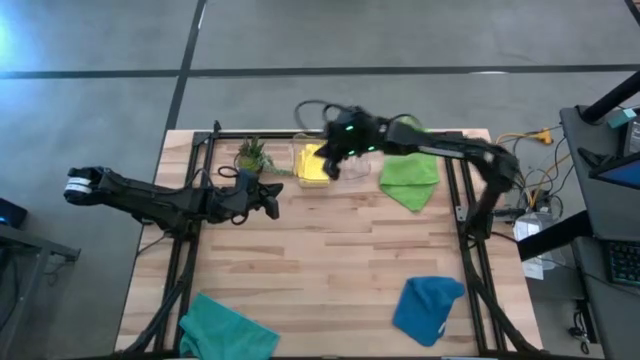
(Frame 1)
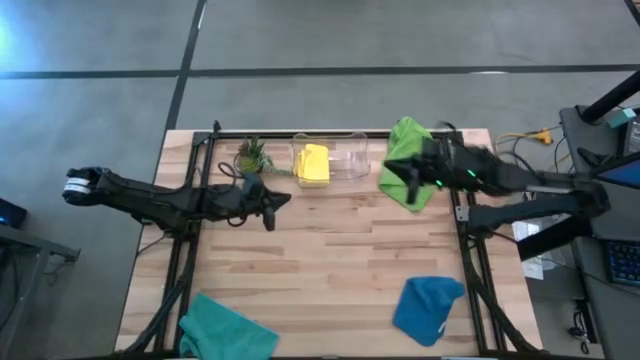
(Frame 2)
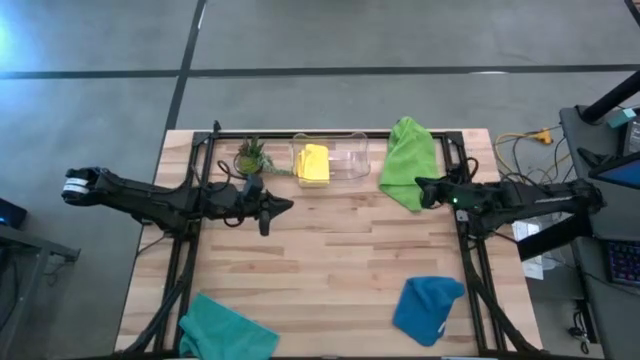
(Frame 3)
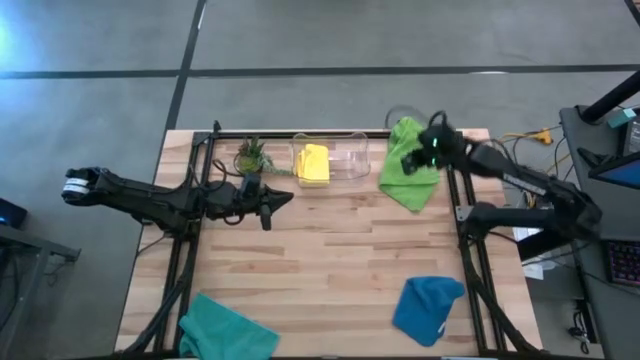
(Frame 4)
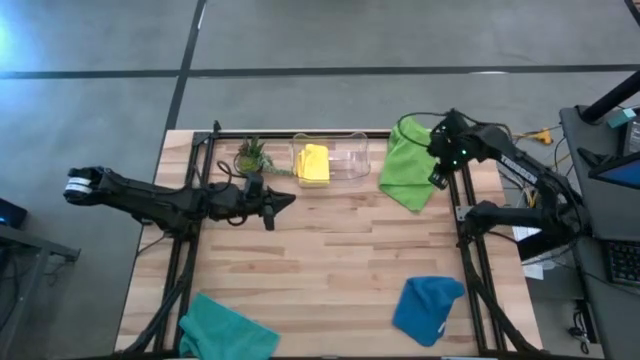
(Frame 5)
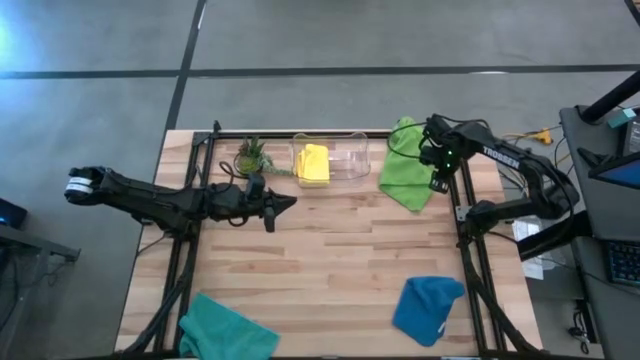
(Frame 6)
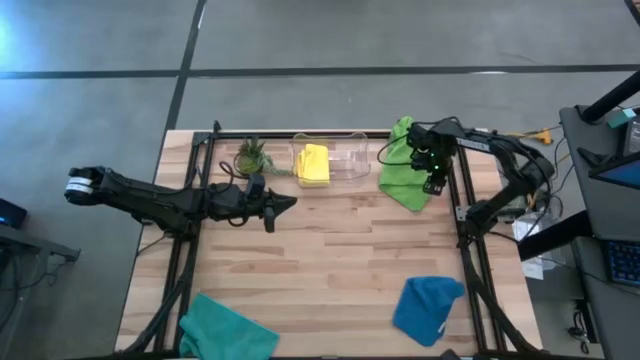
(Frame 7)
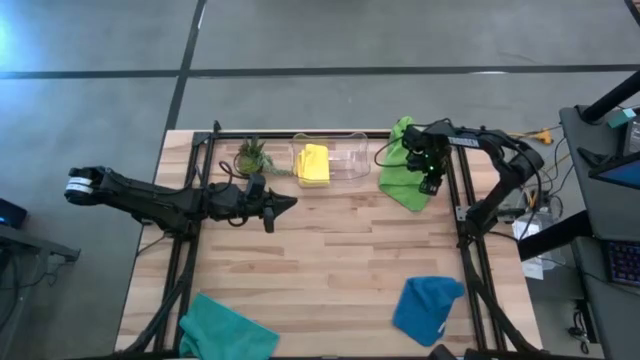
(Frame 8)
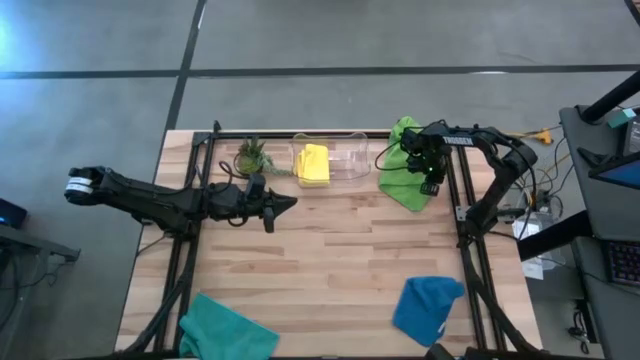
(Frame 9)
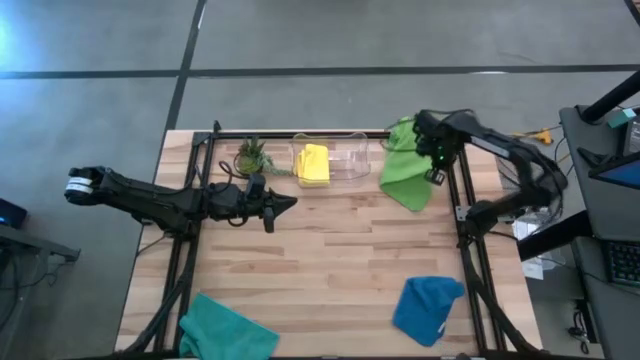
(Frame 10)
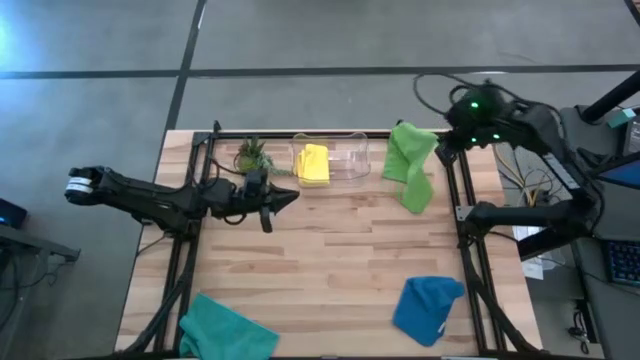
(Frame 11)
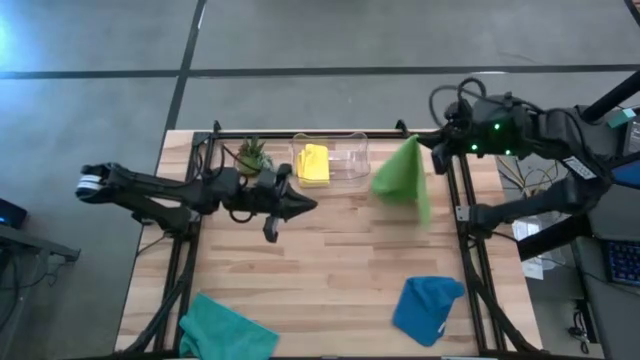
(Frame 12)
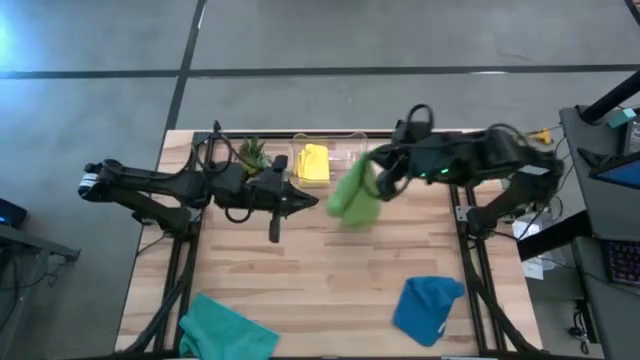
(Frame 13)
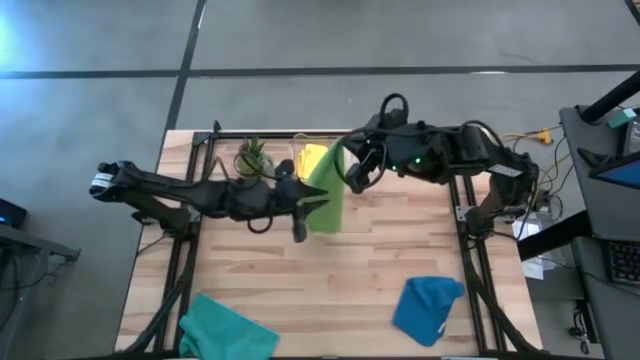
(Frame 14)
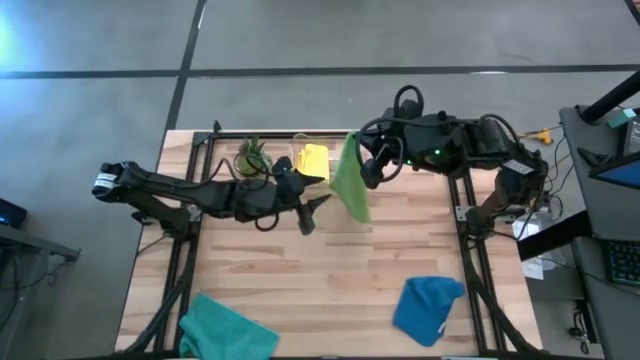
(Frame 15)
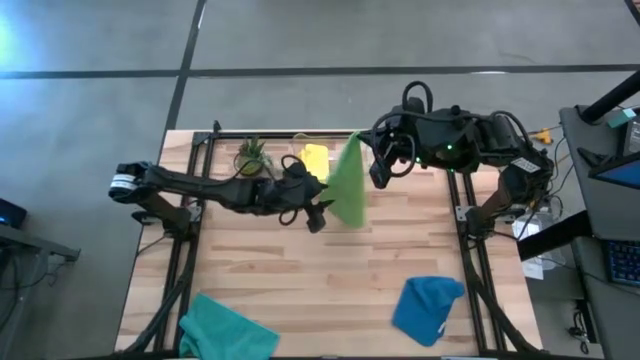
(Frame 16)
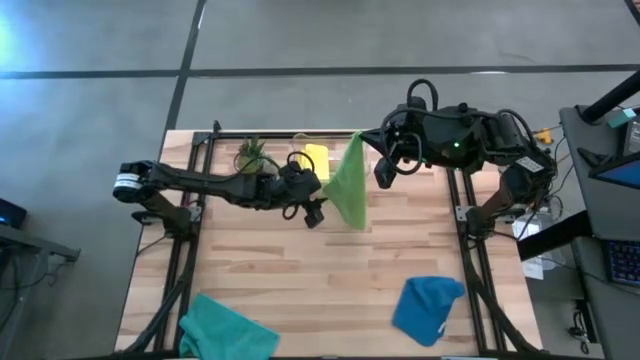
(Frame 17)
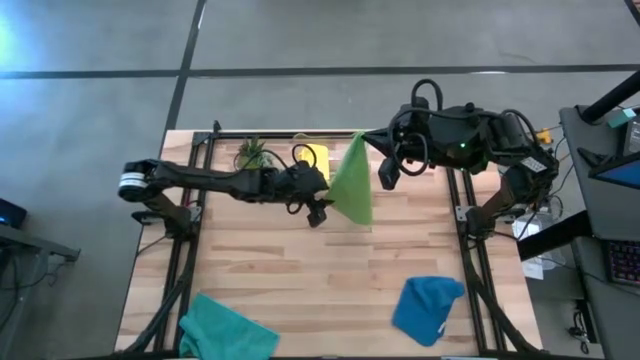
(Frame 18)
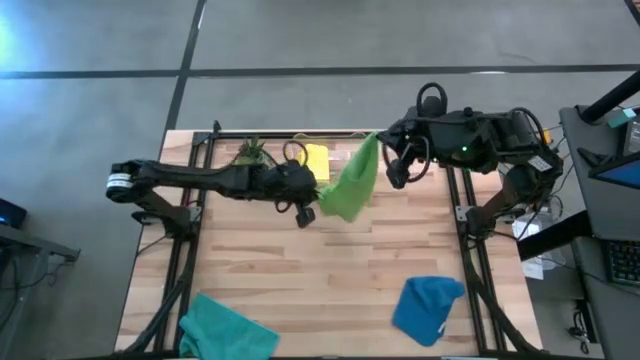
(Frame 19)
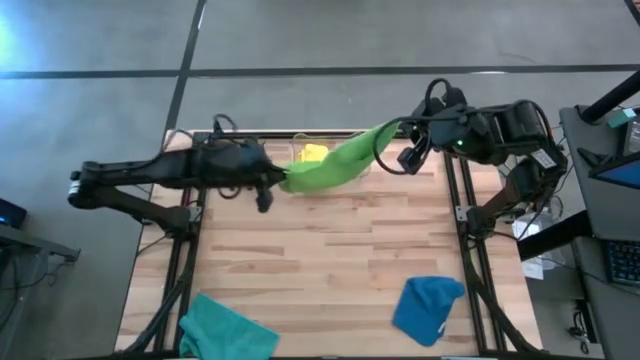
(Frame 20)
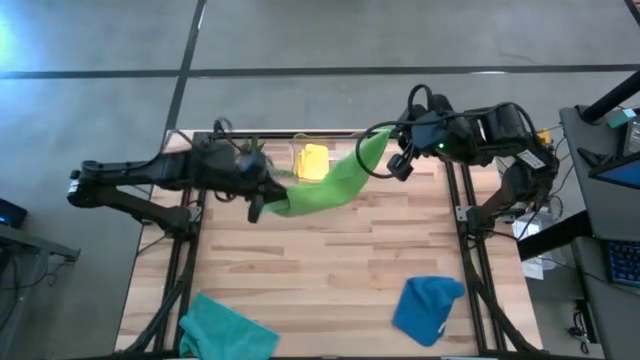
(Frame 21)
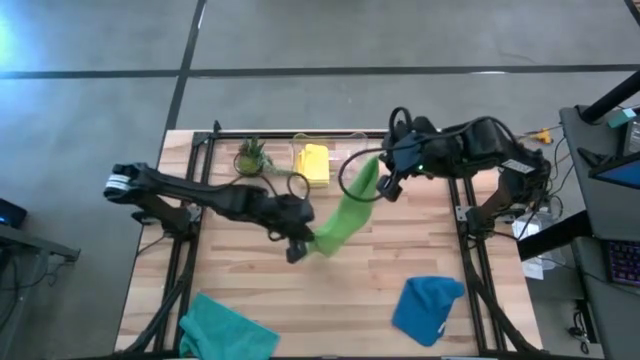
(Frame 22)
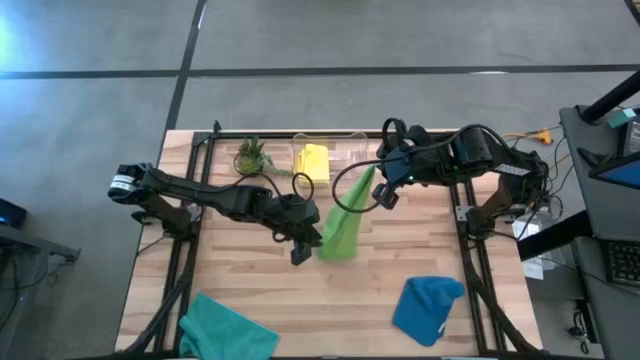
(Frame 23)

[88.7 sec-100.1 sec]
Task: Fold microfiber towels
Fold the green microfiber towel

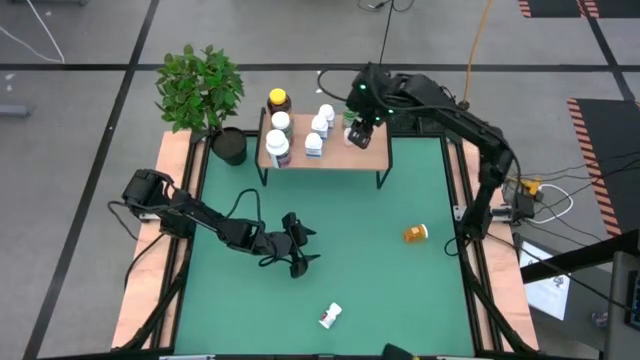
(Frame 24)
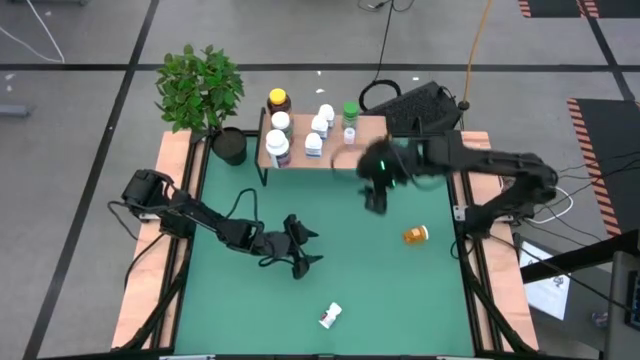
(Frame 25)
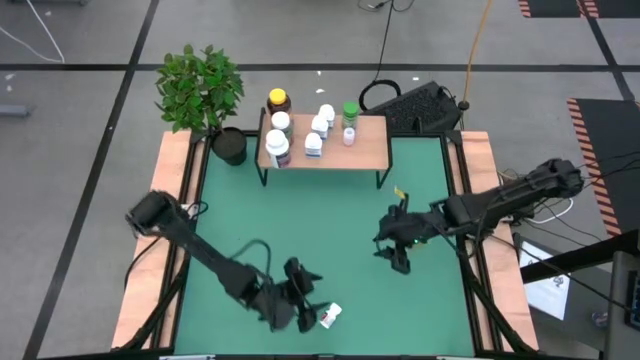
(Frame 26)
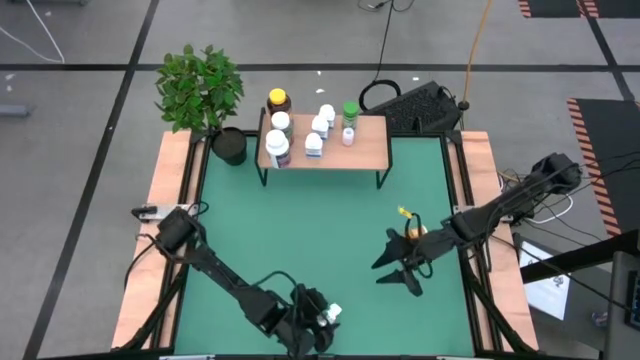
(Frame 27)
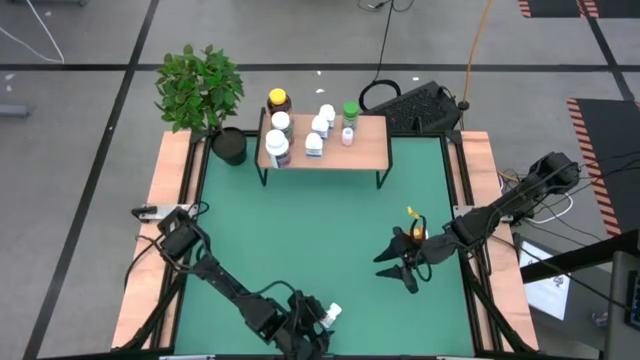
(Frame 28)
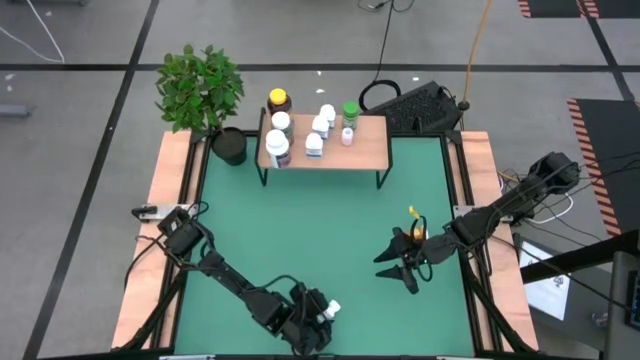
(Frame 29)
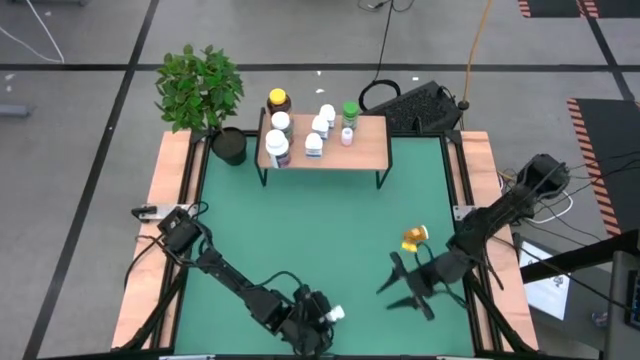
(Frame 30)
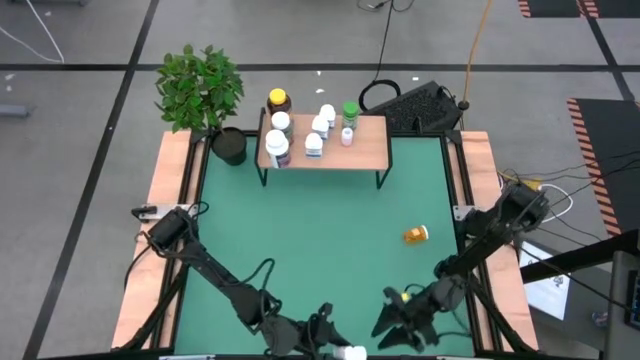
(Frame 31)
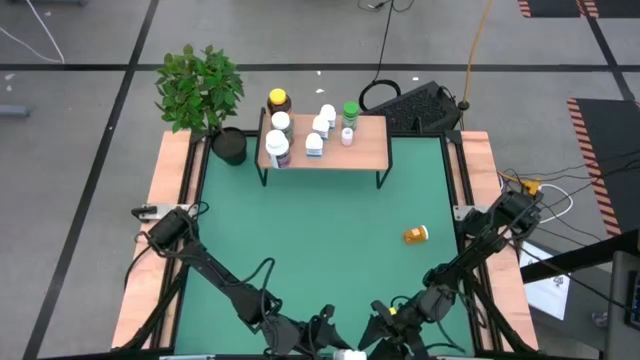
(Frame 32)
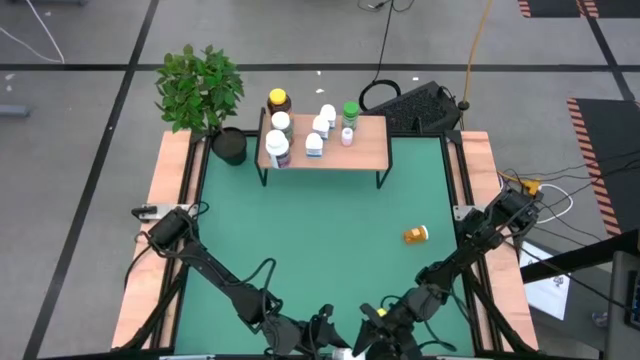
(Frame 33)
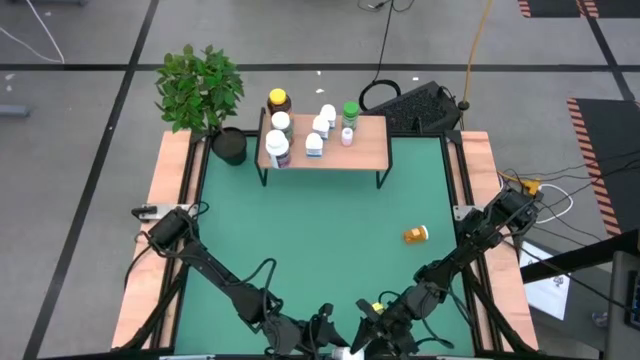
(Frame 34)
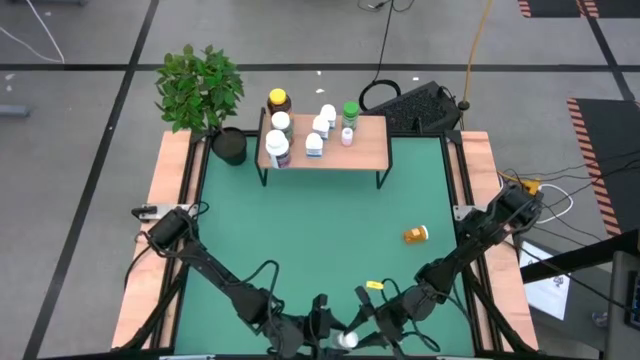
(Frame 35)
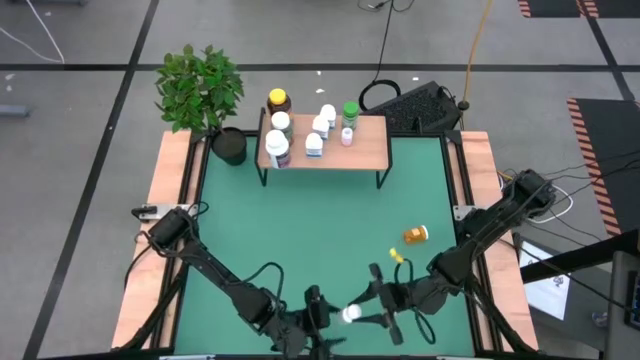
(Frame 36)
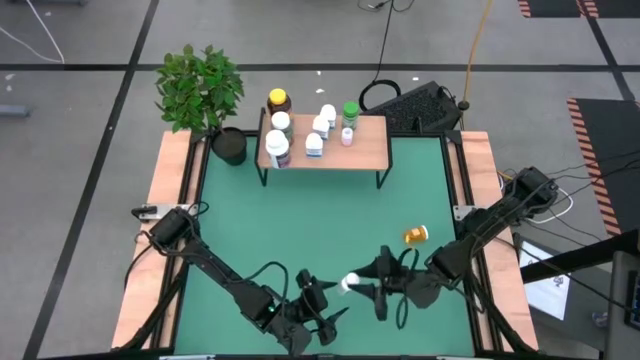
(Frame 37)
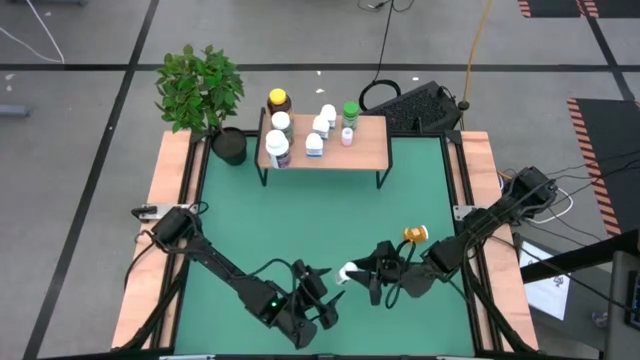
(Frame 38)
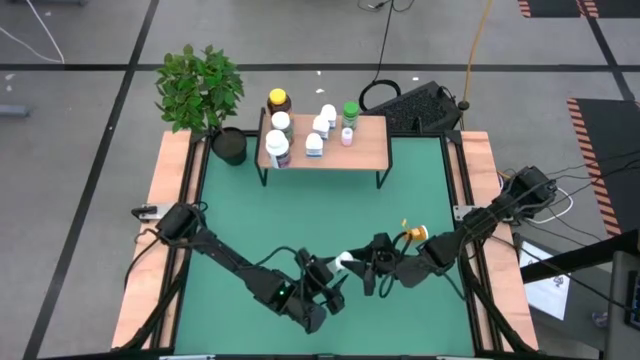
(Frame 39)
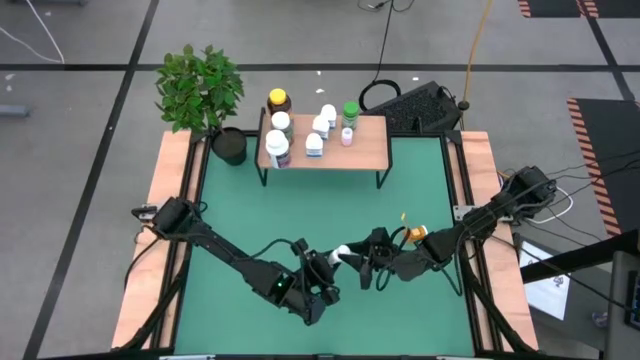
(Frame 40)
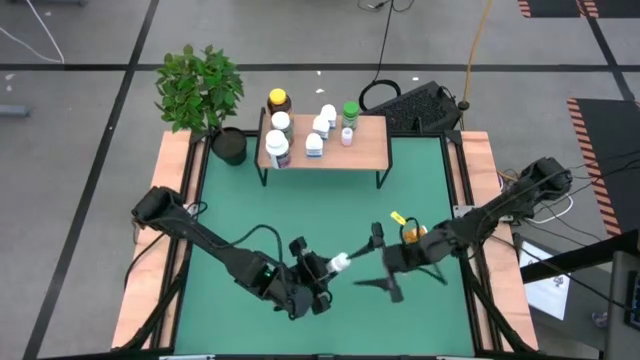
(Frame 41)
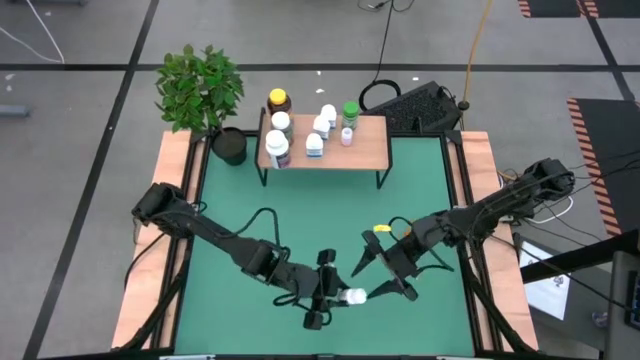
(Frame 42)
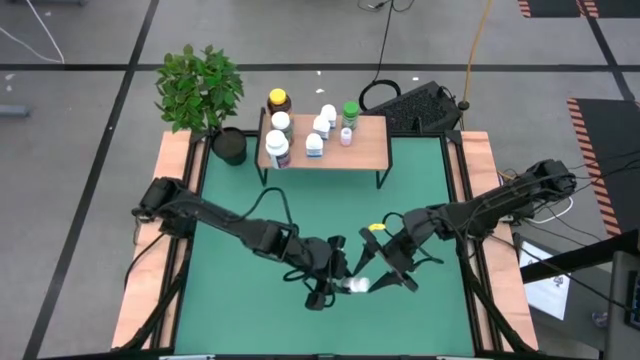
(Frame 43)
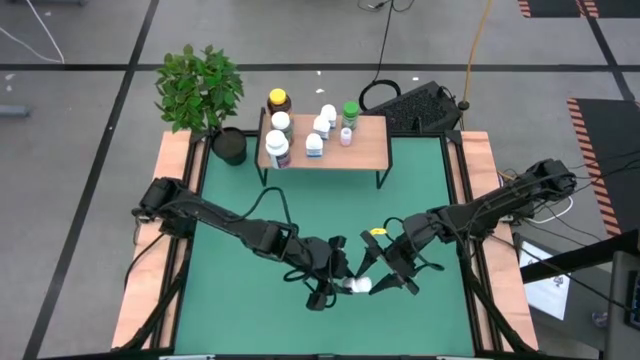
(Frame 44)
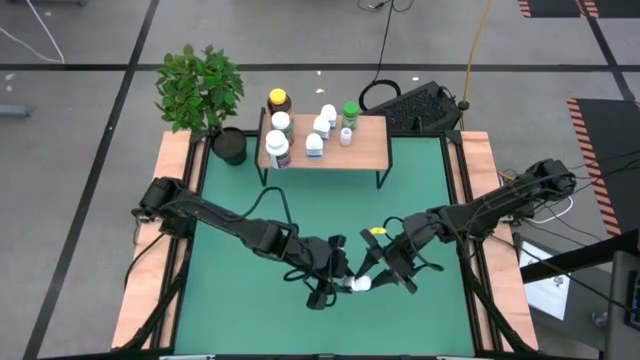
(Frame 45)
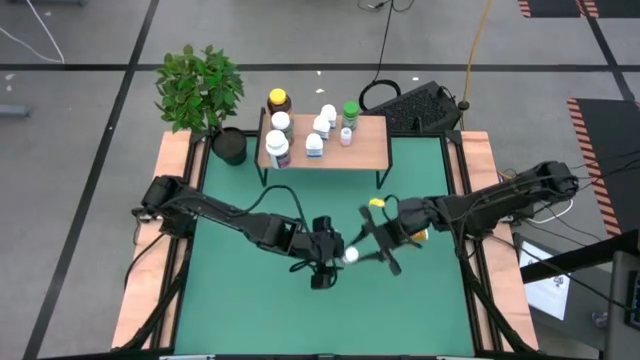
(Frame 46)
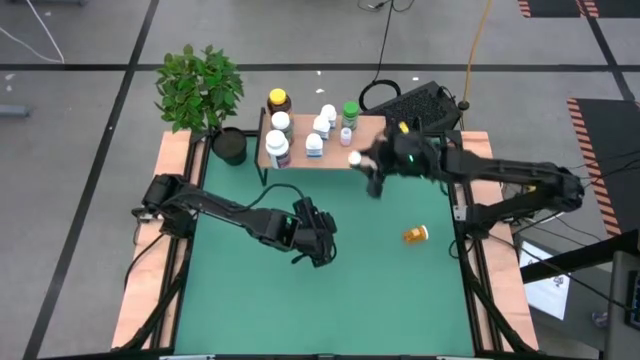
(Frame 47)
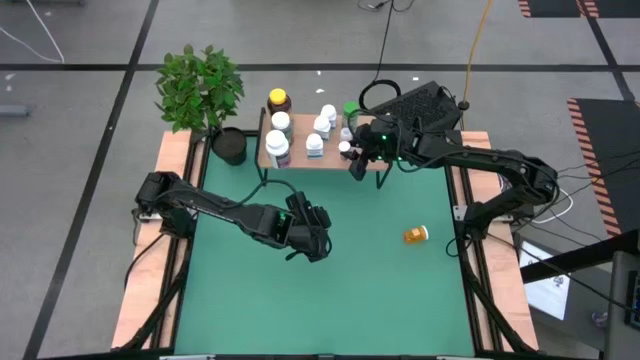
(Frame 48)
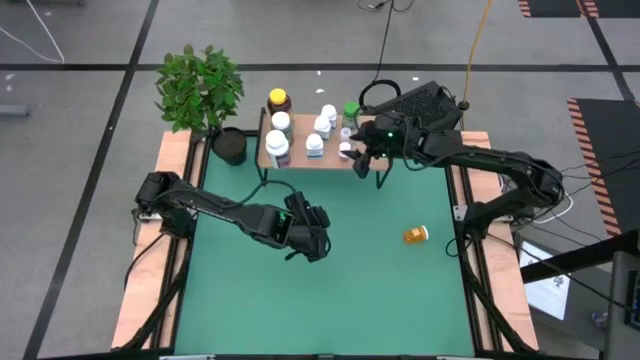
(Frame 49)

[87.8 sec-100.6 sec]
Task: Pick and place medicine bottles onto shelf by color
Put the dark green pill bottle on the shelf
